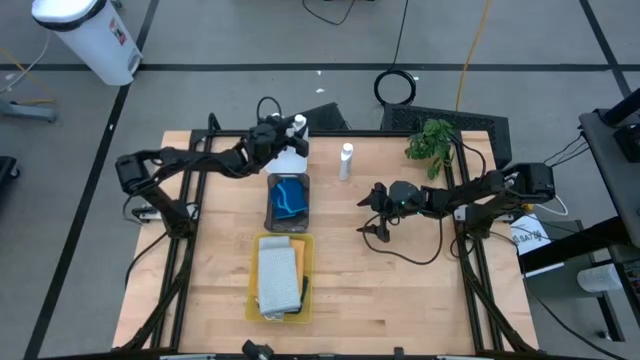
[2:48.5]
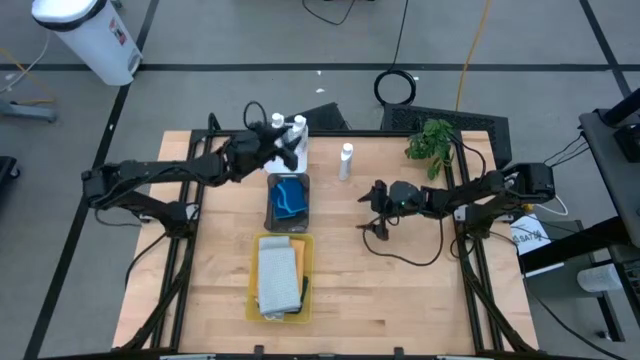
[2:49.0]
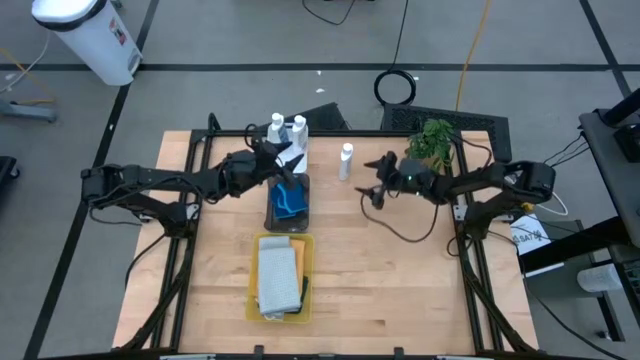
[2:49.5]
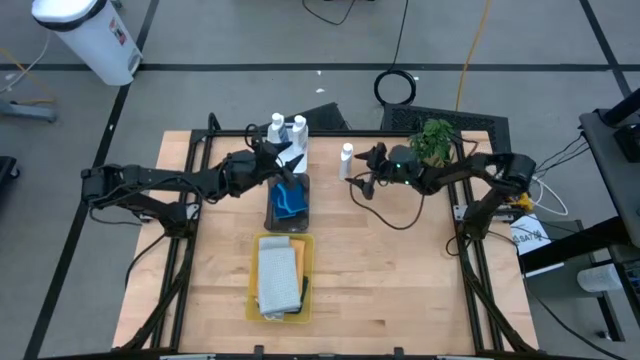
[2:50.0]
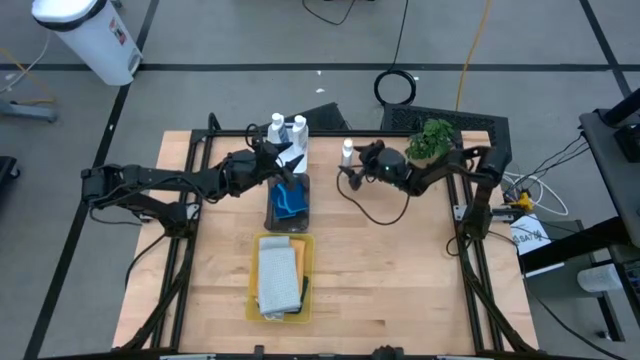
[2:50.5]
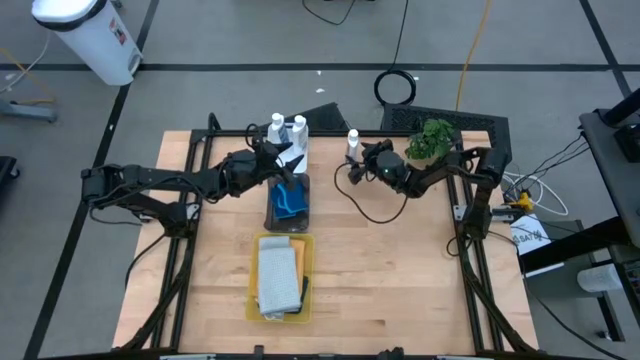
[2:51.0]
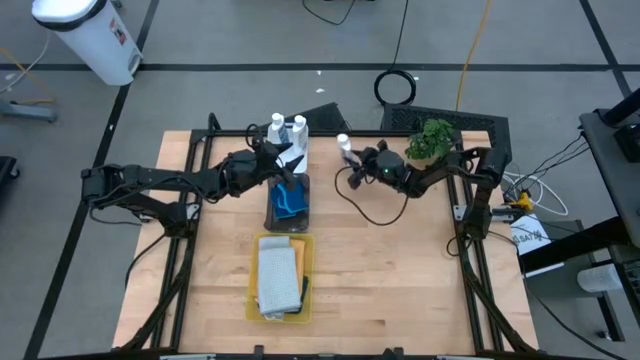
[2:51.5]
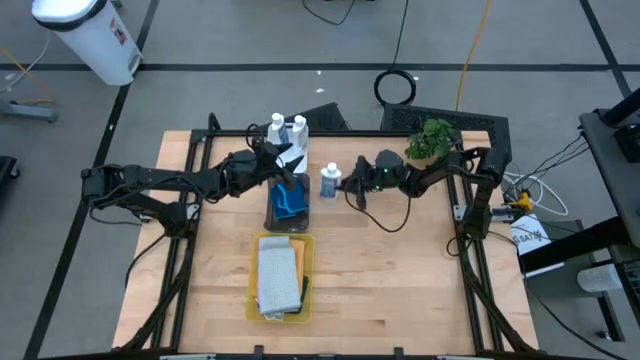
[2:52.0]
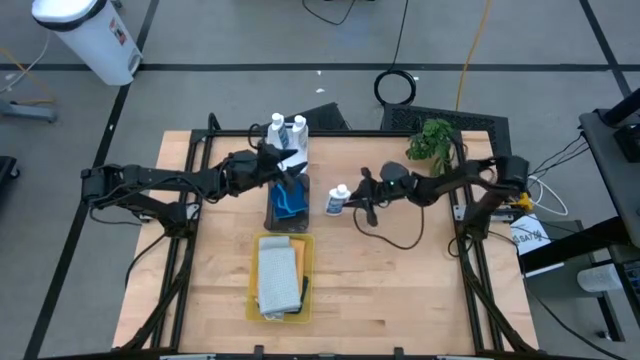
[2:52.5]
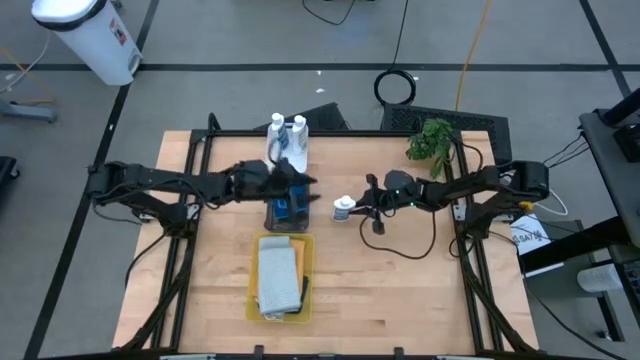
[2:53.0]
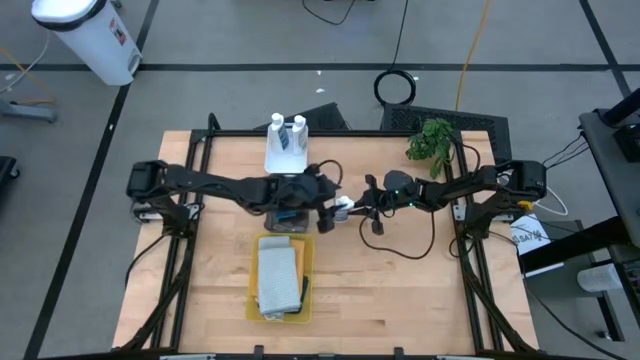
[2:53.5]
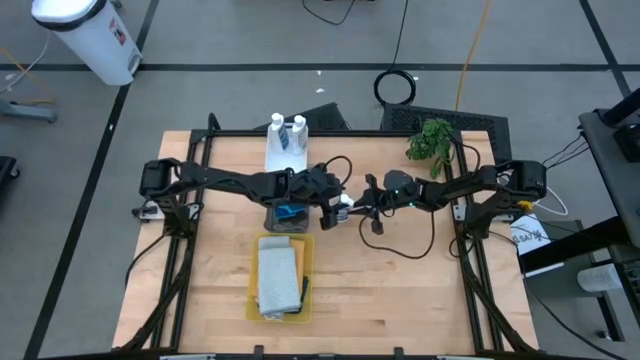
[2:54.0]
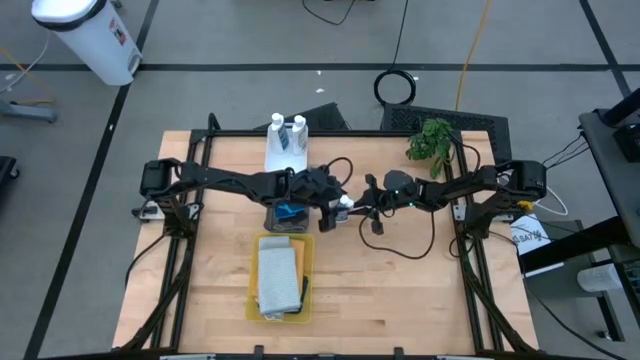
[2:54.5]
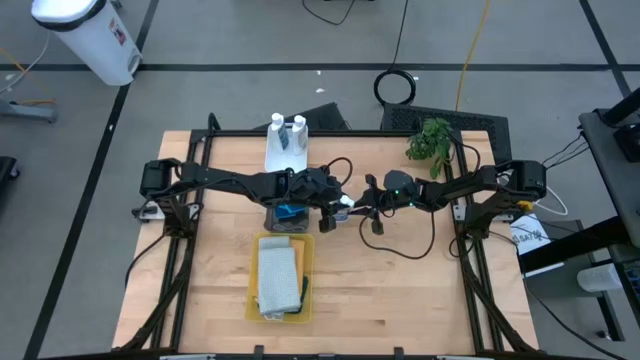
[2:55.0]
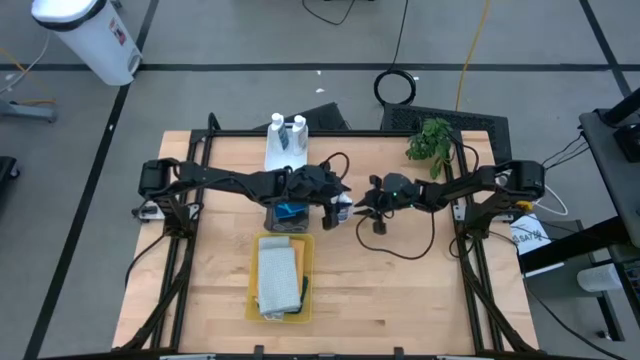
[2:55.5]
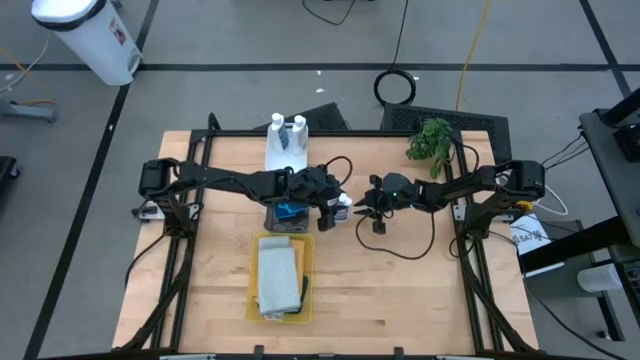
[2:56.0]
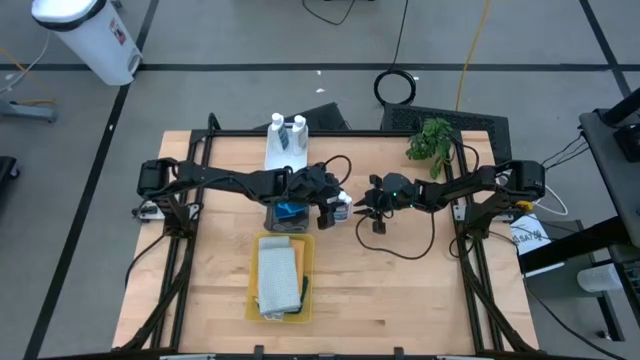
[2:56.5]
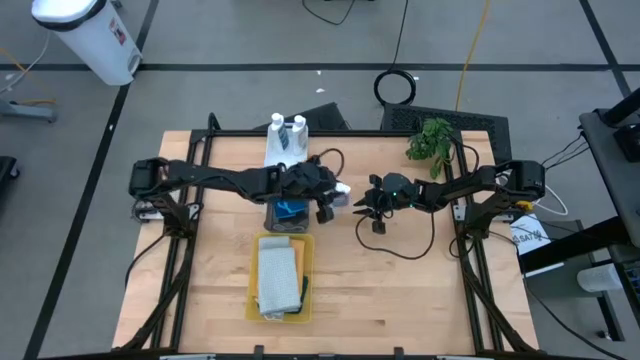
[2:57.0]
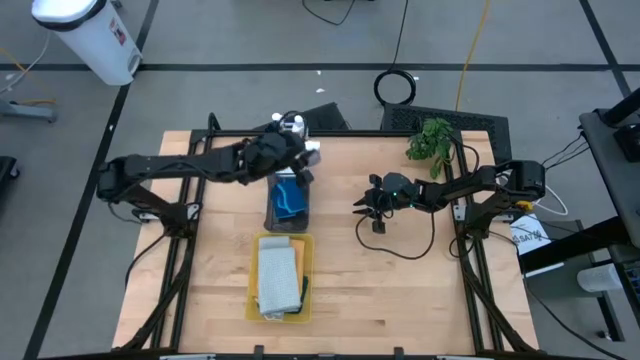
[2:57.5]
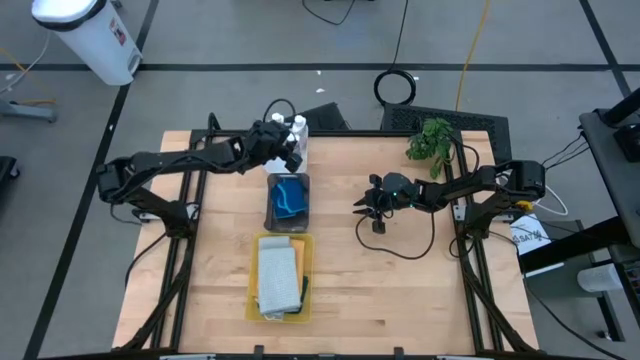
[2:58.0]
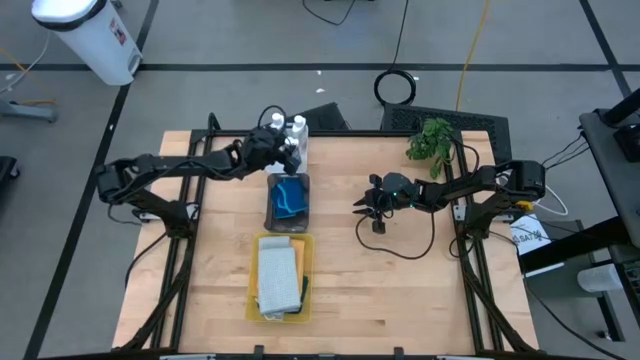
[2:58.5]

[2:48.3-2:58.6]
Task: Pick & Place Kitchen Items
Put the white plastic restorer bottle into the white bin

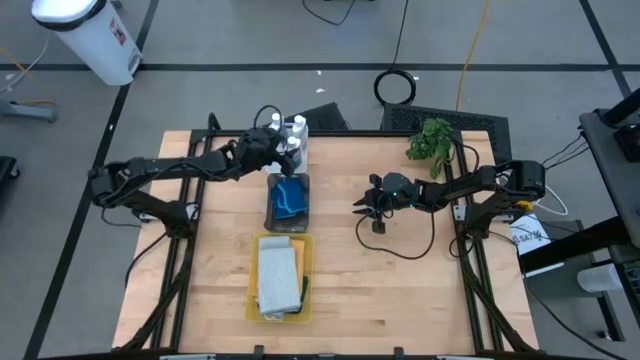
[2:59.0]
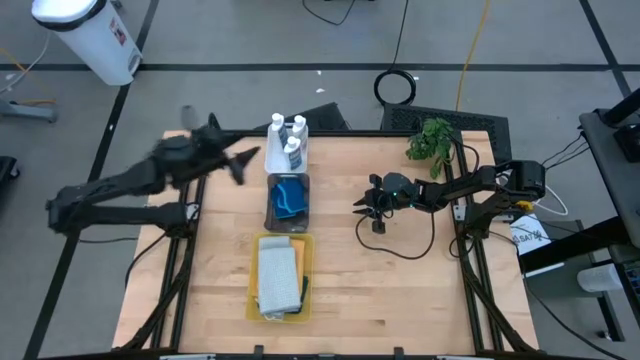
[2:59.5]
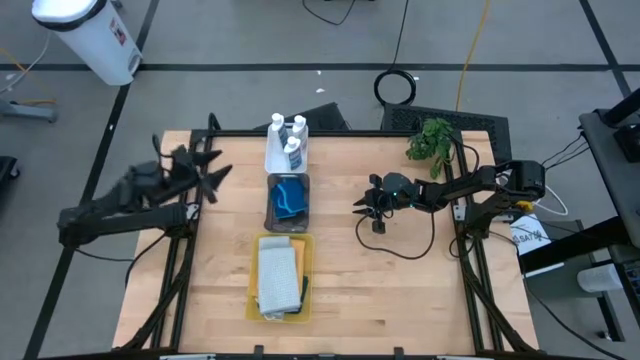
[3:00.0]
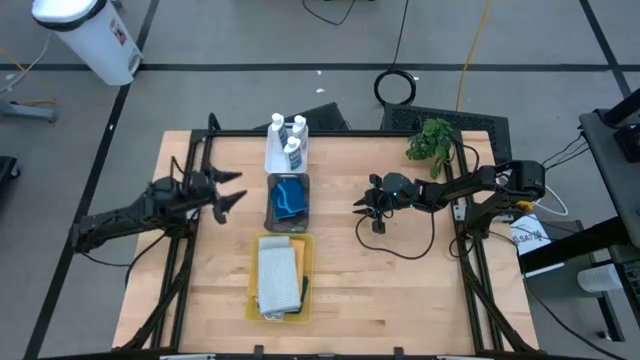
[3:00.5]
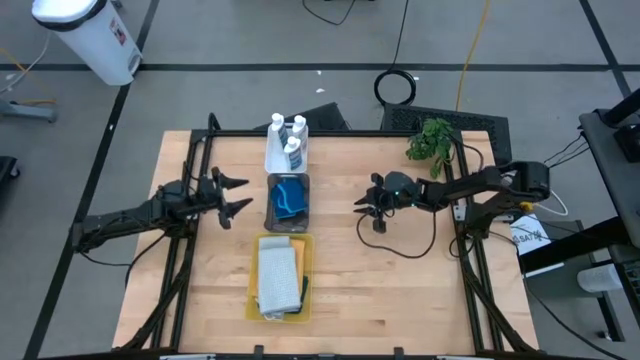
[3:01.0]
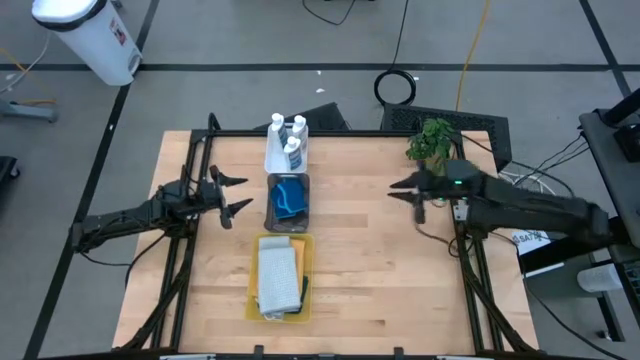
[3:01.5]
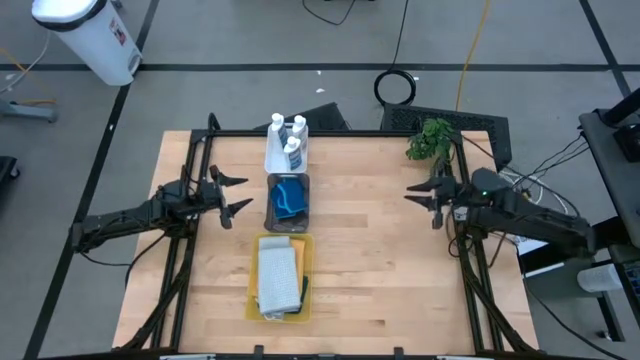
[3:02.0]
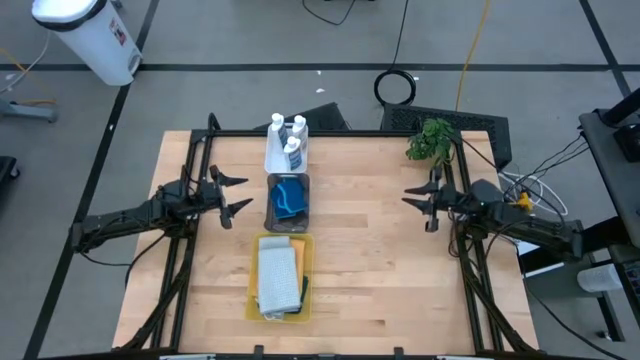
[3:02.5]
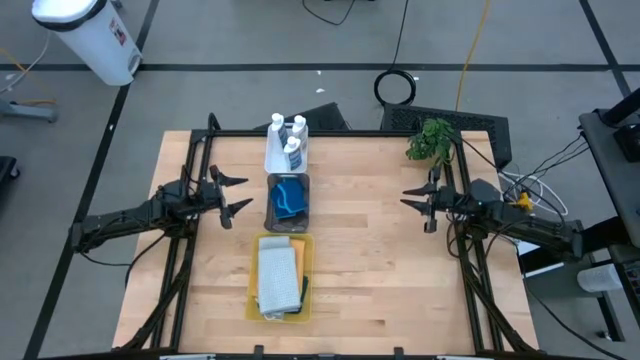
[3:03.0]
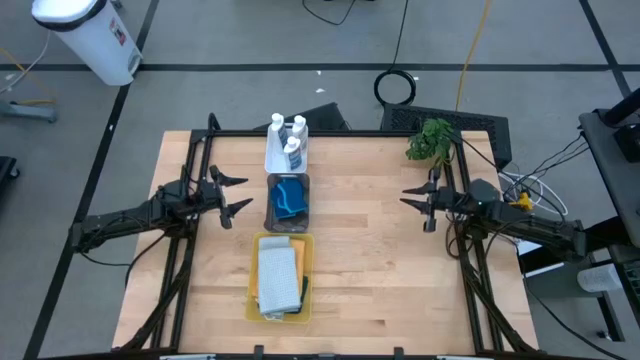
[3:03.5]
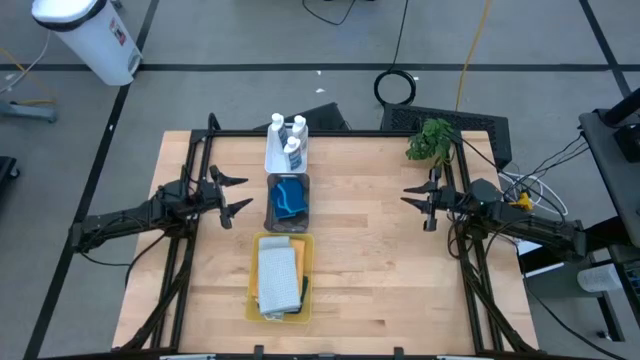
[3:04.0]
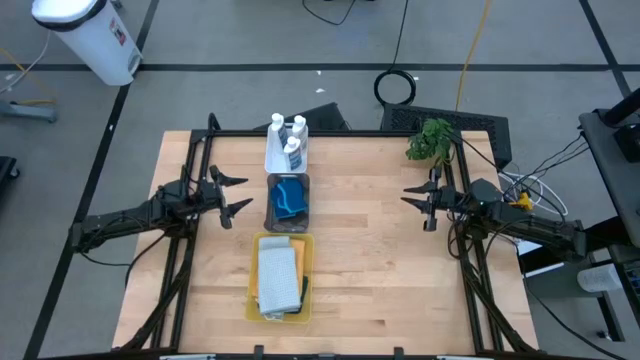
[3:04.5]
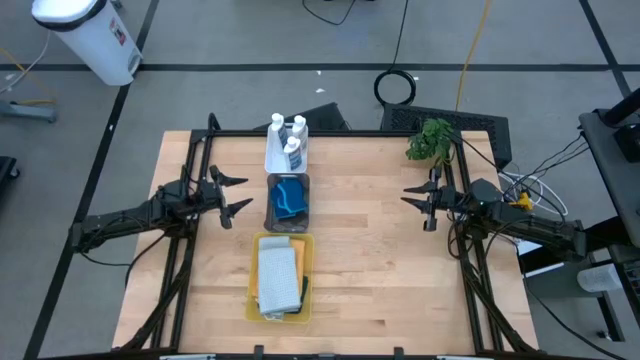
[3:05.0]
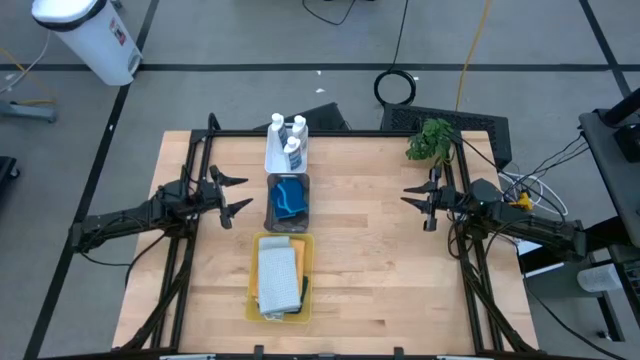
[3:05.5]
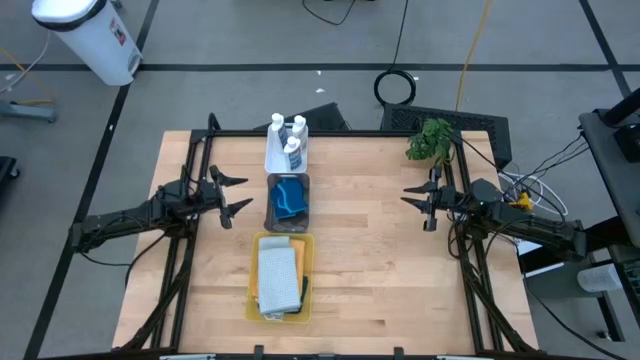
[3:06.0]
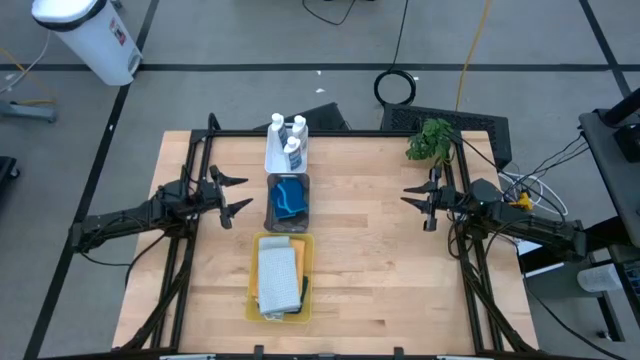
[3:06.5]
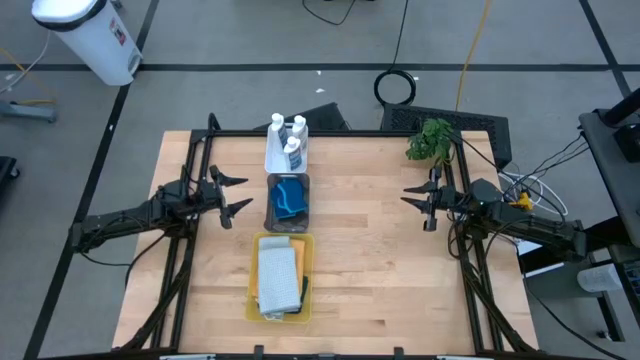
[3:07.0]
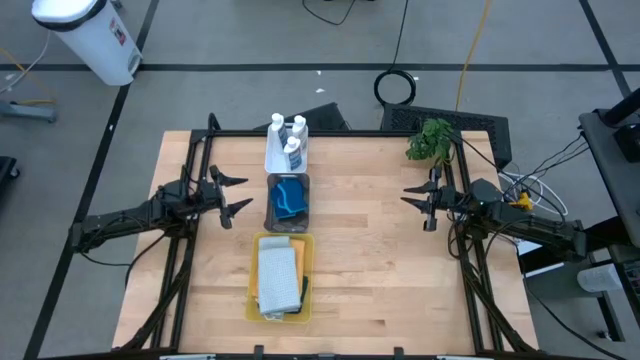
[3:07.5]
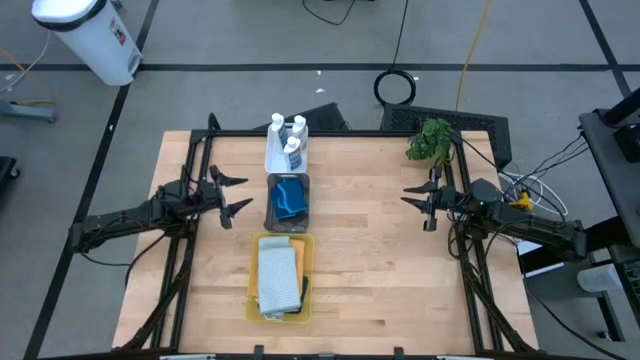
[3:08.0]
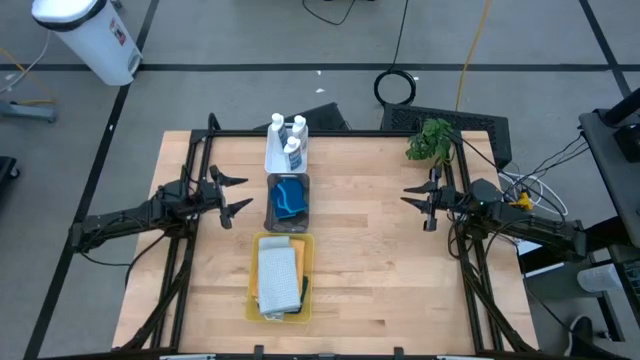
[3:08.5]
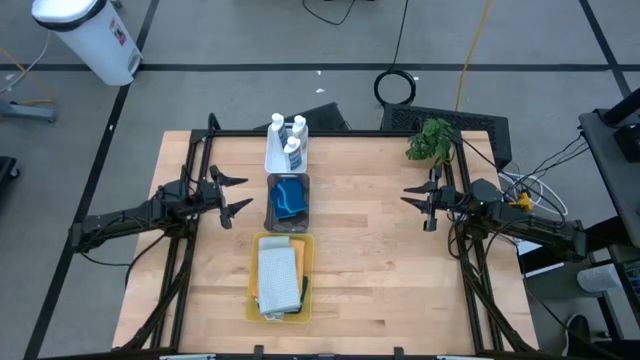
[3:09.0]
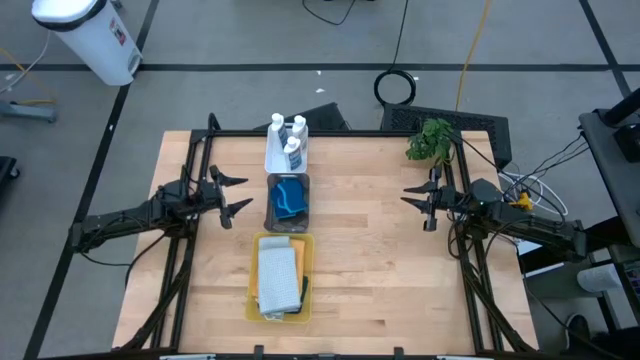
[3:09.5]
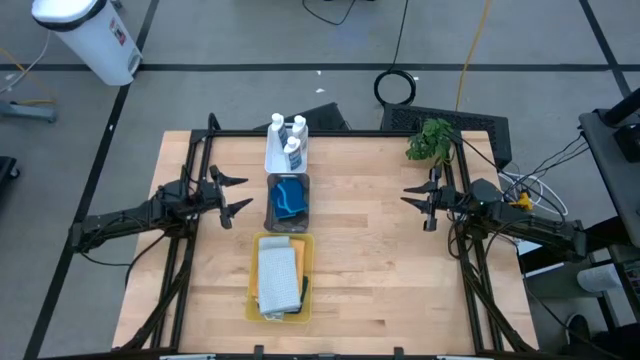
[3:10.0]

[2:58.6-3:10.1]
Return to Home Position
